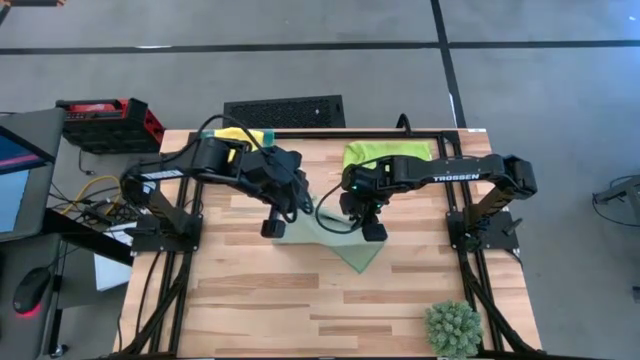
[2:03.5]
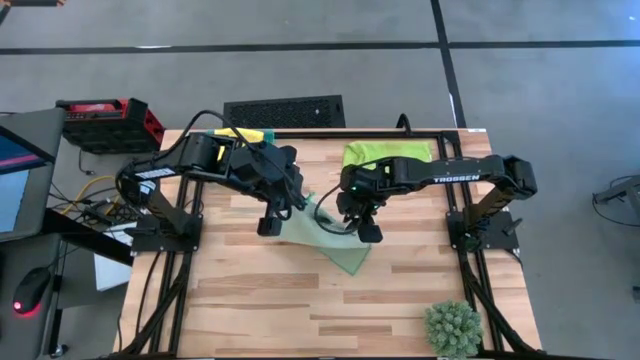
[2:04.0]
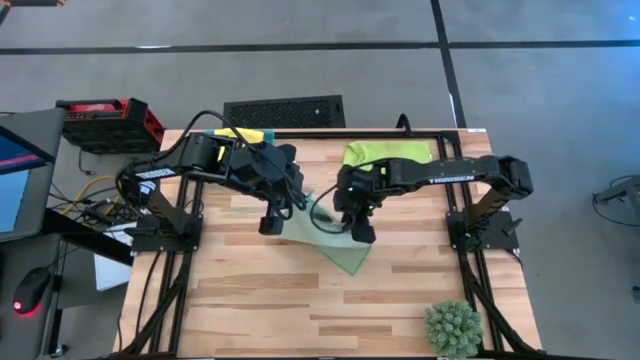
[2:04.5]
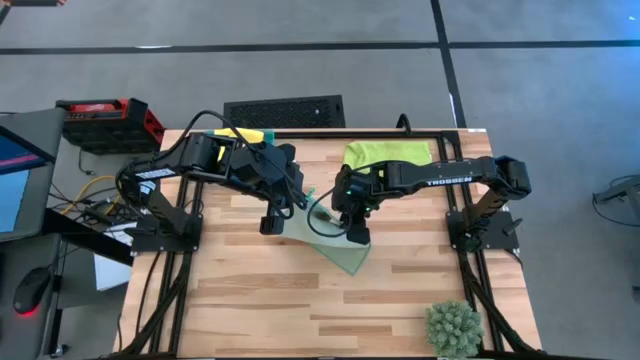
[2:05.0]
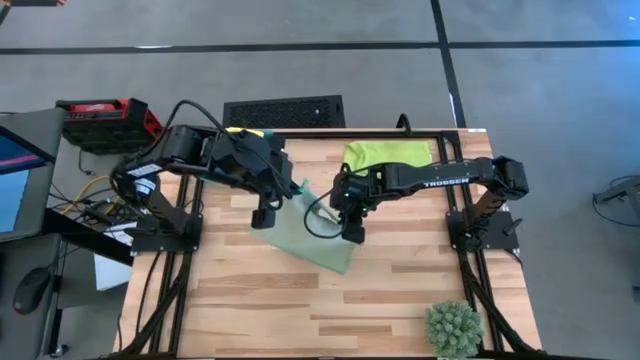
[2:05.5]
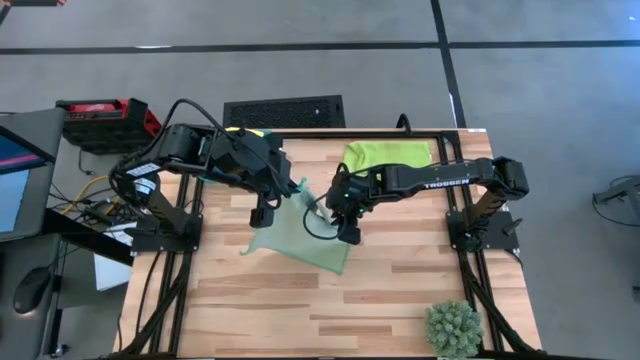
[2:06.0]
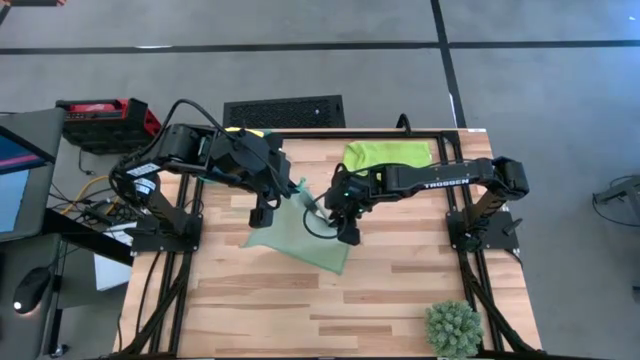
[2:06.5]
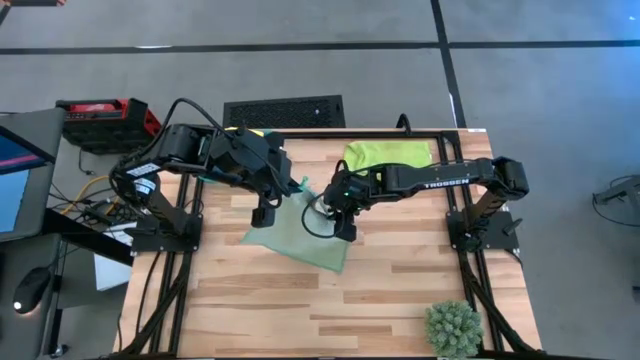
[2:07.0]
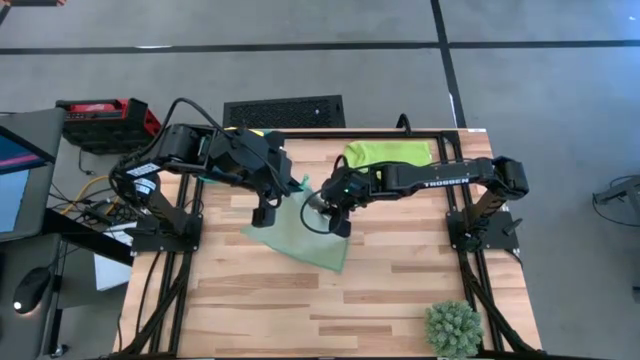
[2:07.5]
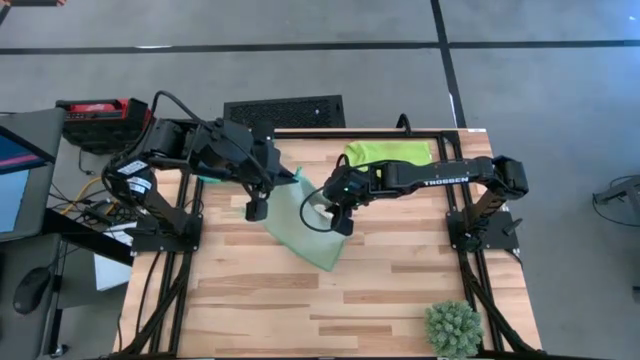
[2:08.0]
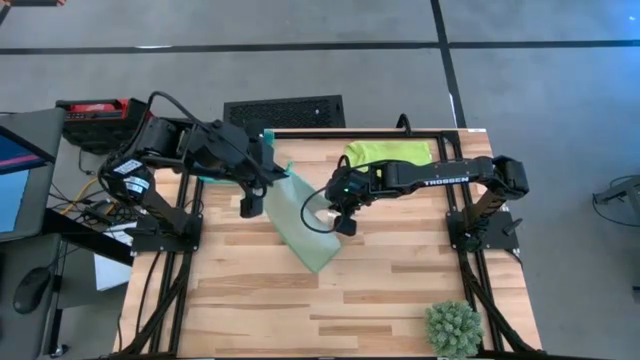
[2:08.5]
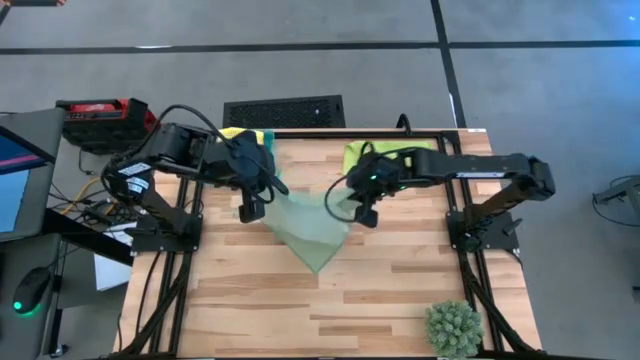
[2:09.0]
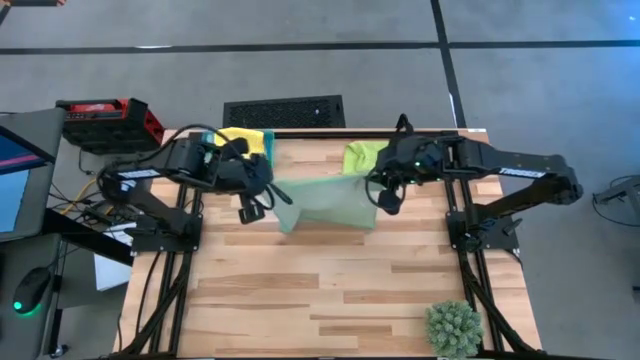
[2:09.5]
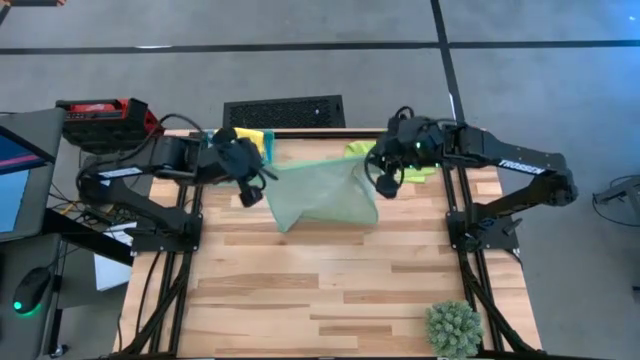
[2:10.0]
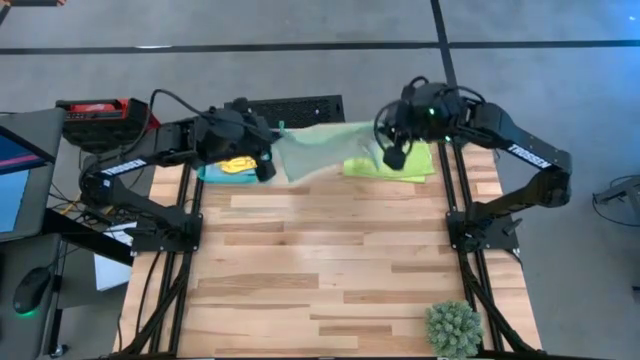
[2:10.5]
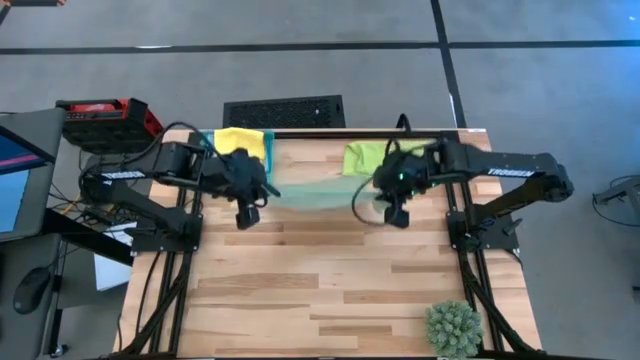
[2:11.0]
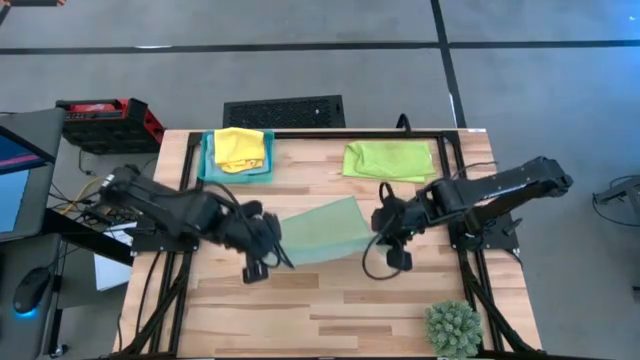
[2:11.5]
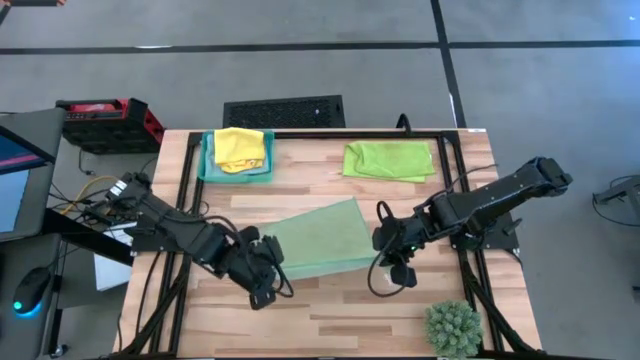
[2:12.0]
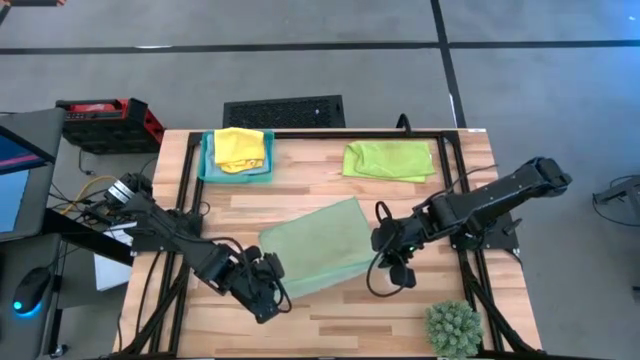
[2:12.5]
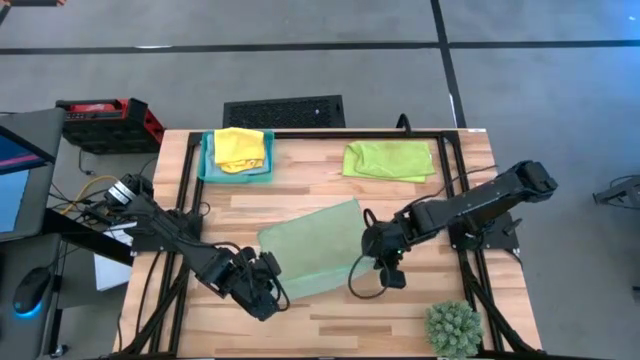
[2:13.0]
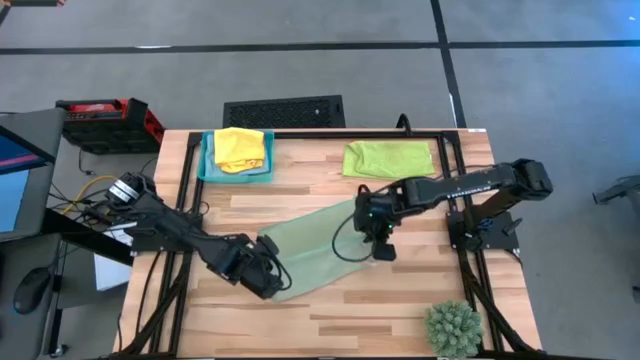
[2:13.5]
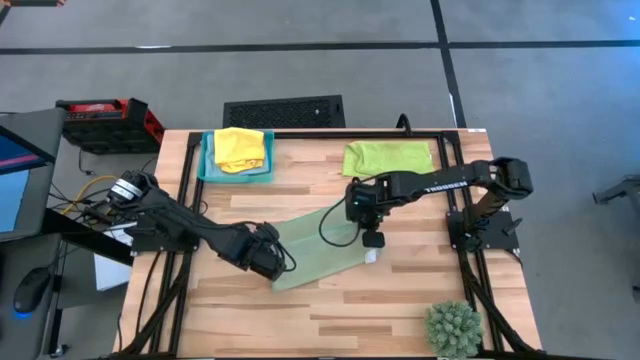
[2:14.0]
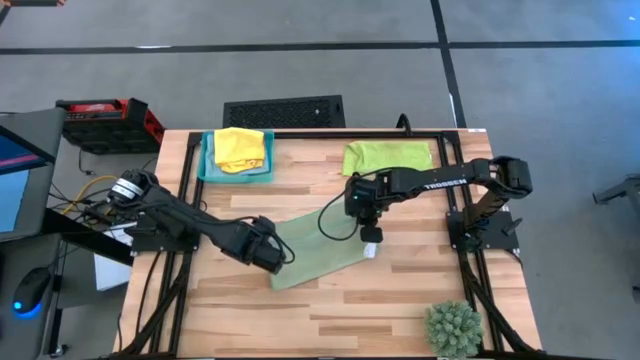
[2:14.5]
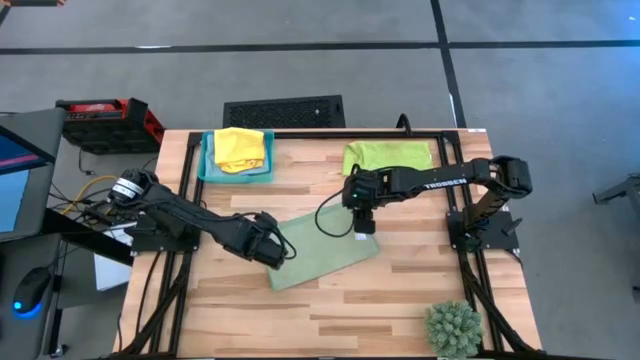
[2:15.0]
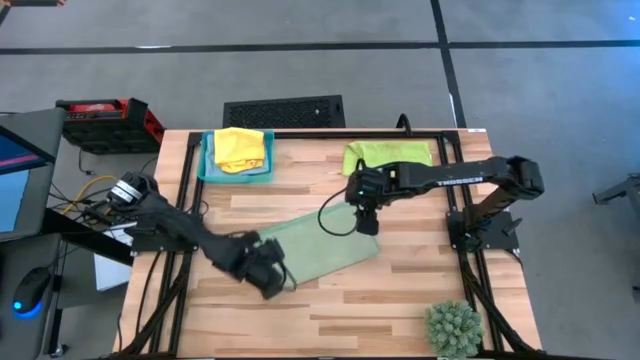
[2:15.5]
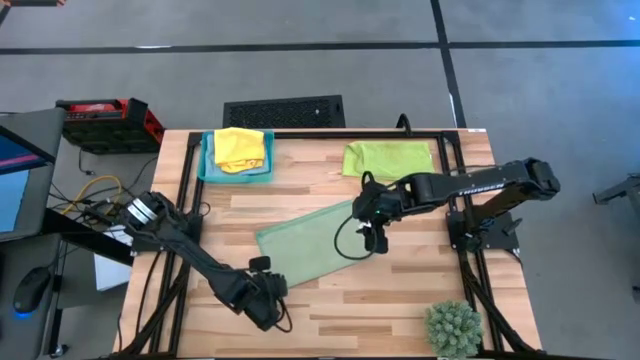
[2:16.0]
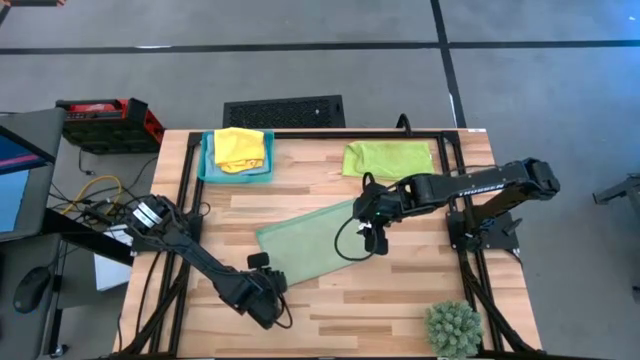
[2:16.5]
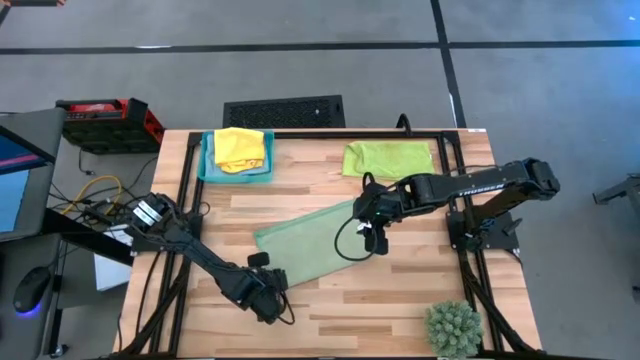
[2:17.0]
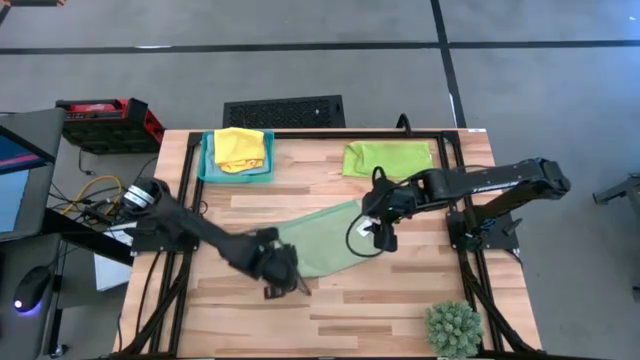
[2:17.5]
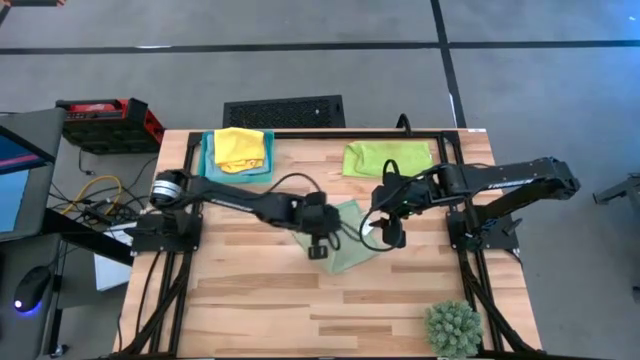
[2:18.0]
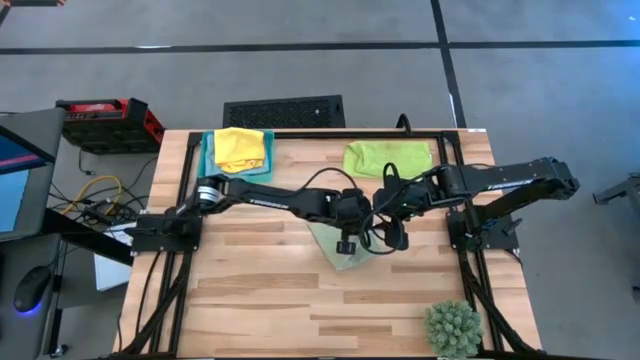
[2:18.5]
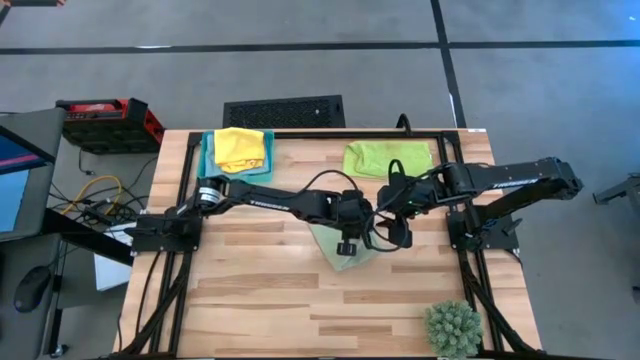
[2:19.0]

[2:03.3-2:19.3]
Task: Fold microfiber towels
Fold the green microfiber towel

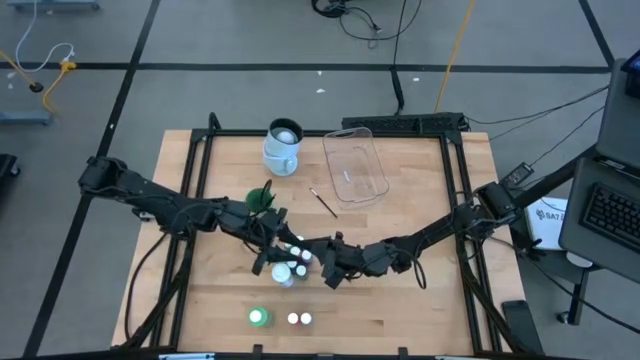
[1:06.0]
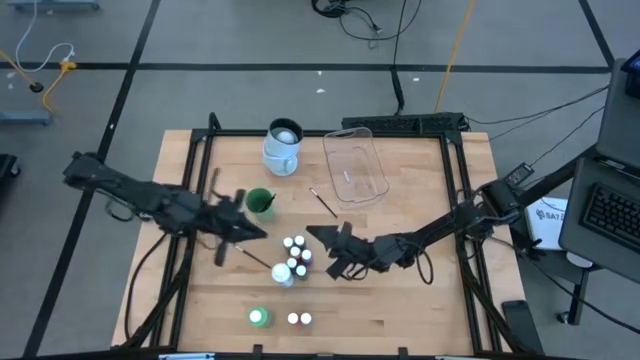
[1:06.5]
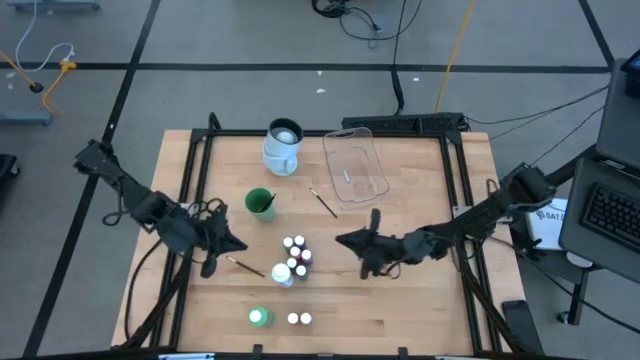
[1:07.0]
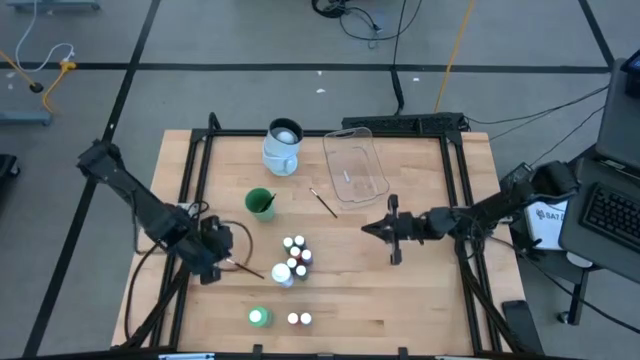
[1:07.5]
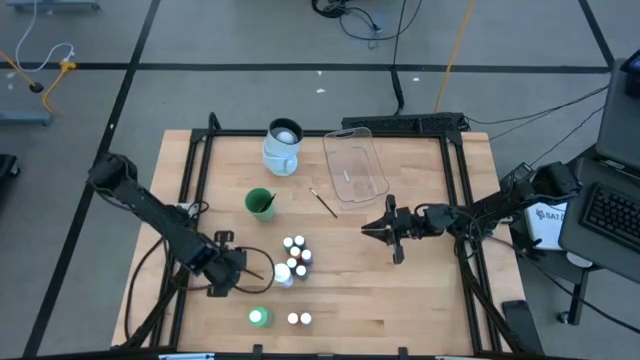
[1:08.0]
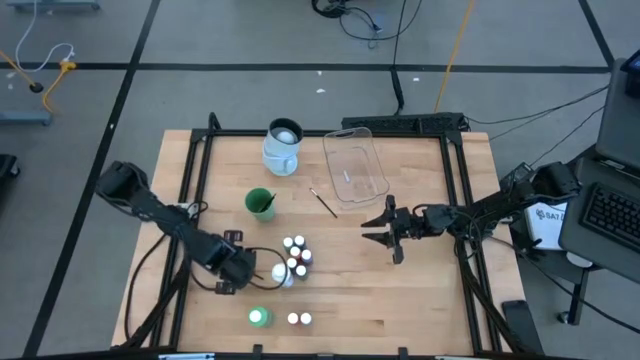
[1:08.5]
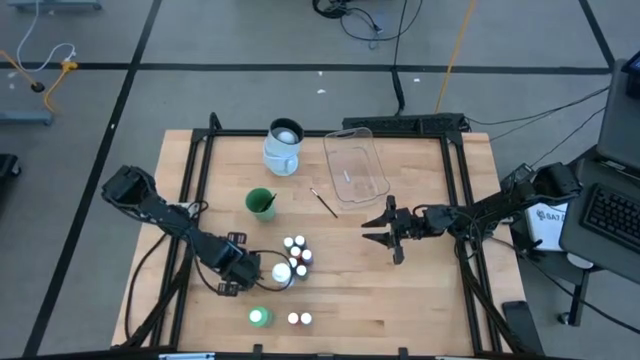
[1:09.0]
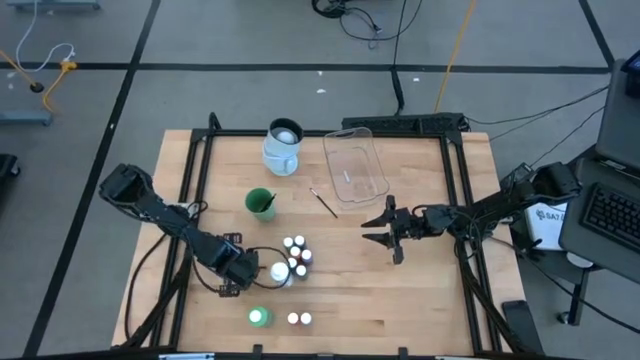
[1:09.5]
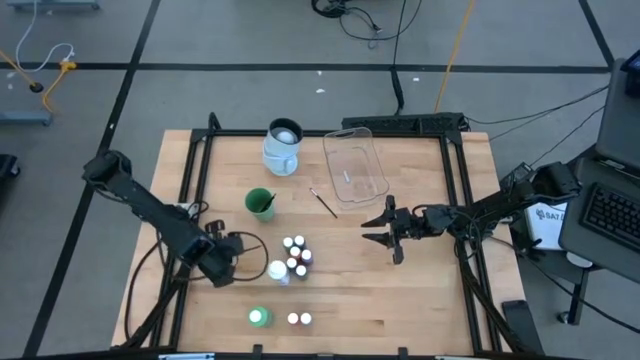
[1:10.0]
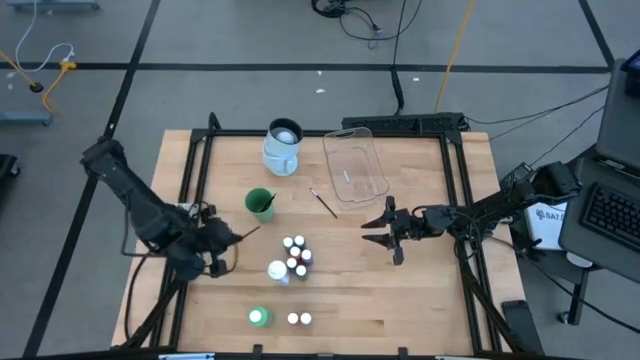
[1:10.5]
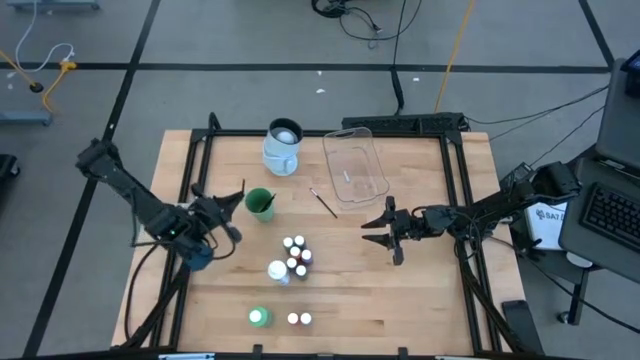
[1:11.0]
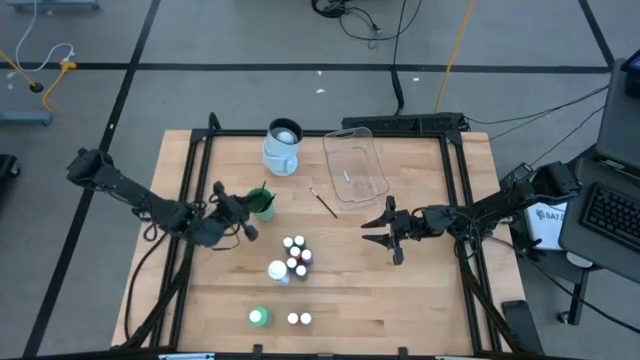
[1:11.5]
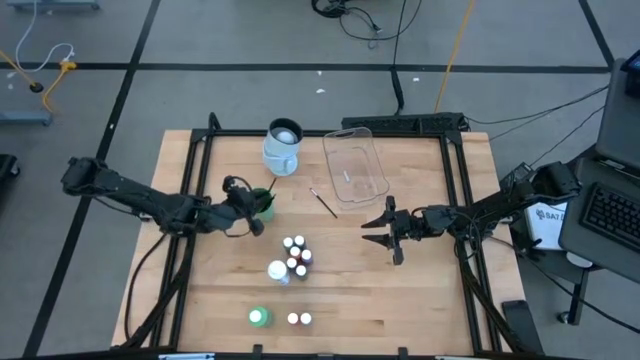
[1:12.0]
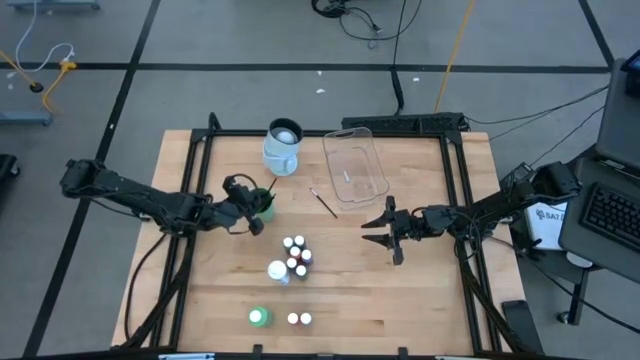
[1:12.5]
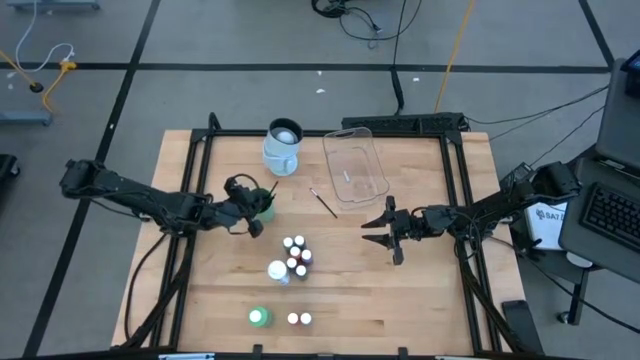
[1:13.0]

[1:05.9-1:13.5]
Task: Pick & Place Paint Supplies
Put the silver paintbrush into the green cup
